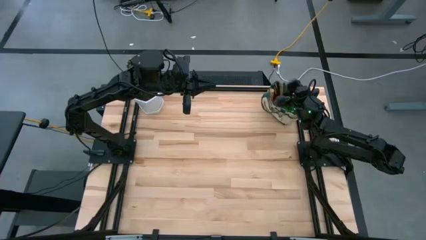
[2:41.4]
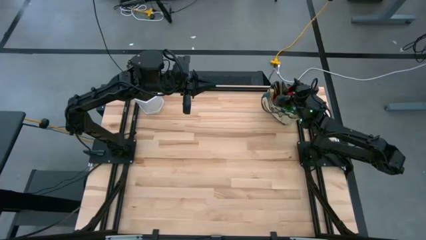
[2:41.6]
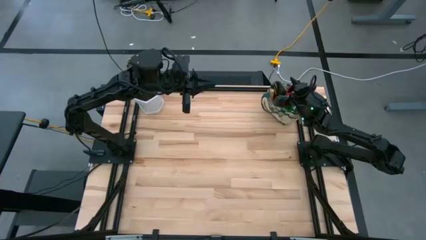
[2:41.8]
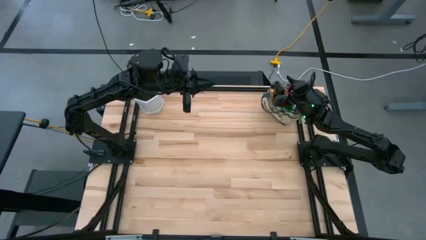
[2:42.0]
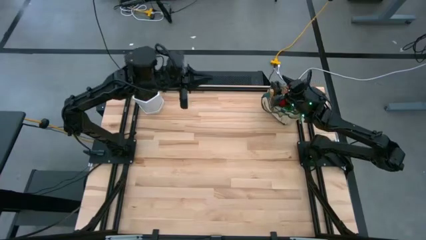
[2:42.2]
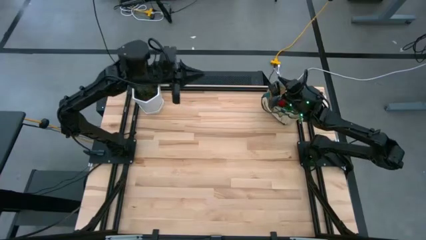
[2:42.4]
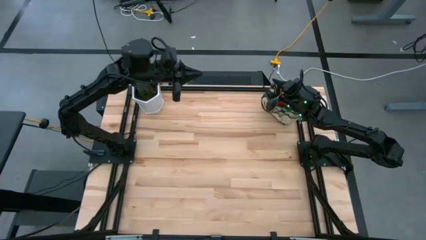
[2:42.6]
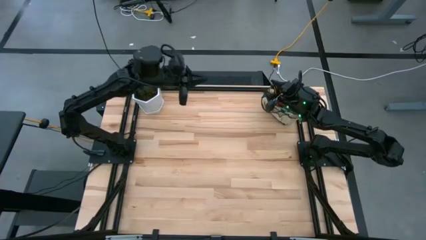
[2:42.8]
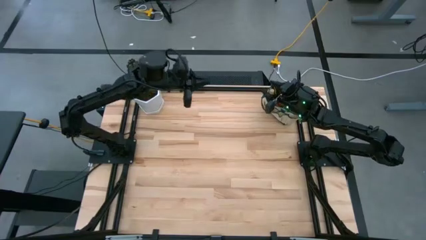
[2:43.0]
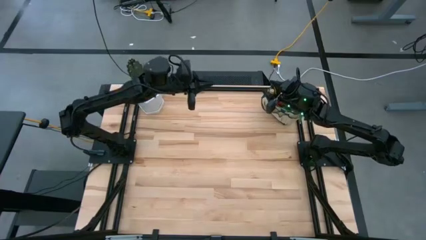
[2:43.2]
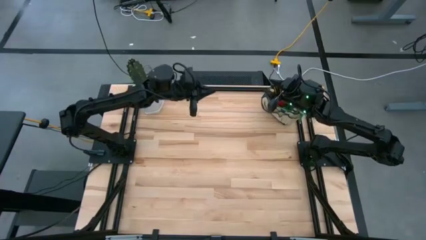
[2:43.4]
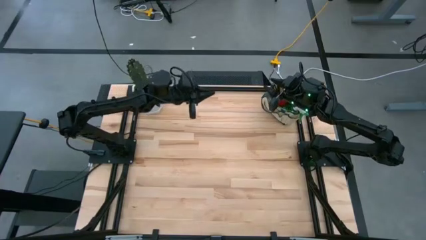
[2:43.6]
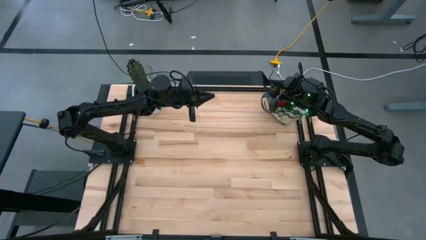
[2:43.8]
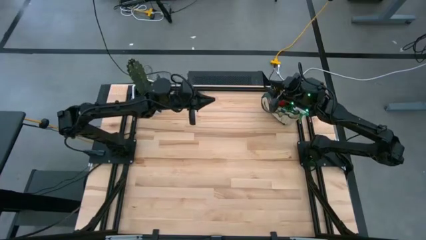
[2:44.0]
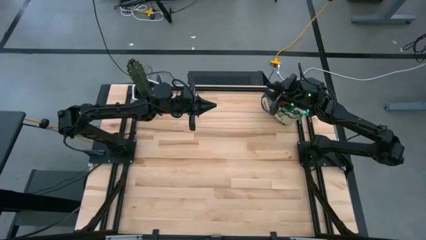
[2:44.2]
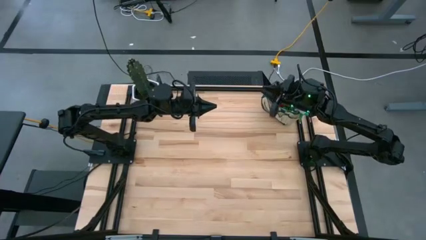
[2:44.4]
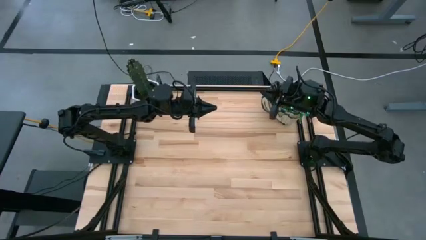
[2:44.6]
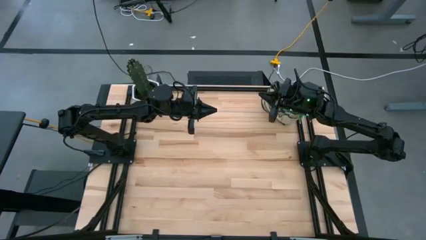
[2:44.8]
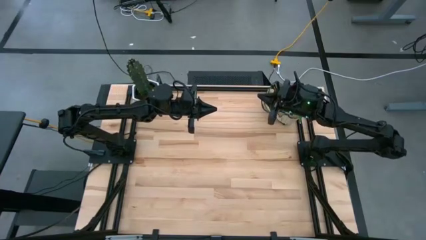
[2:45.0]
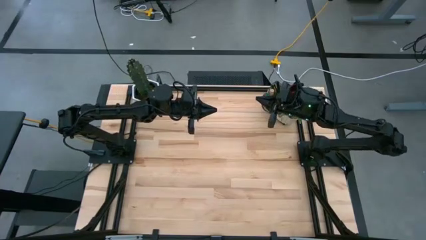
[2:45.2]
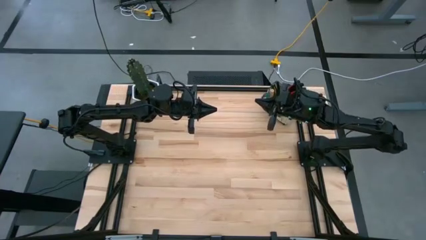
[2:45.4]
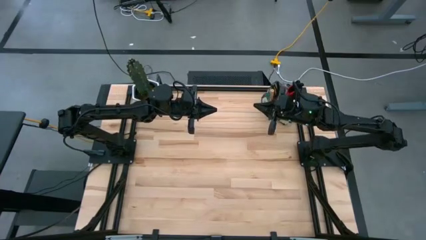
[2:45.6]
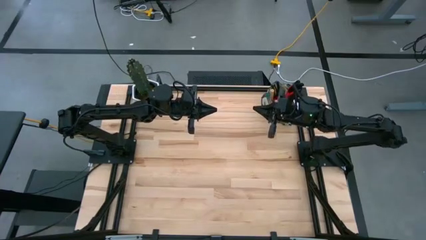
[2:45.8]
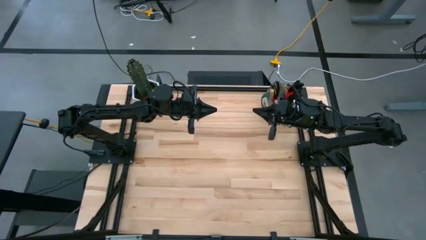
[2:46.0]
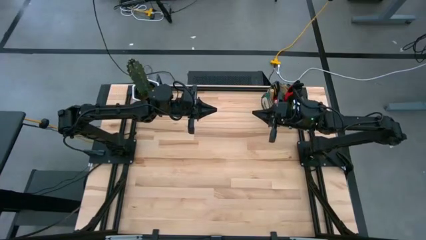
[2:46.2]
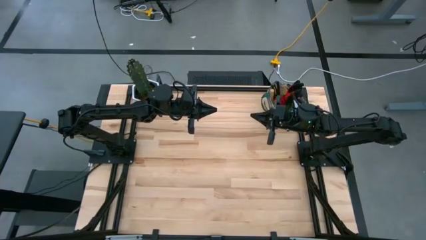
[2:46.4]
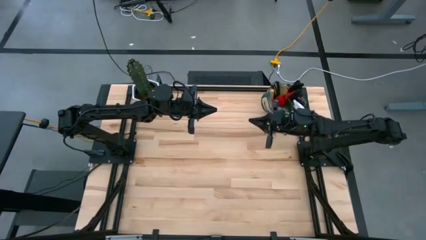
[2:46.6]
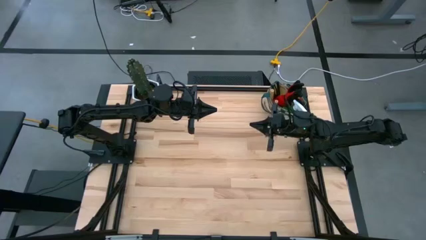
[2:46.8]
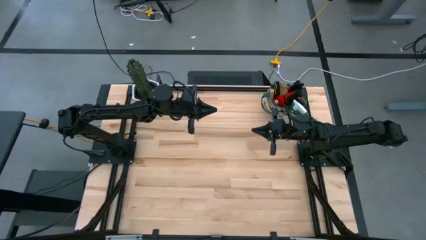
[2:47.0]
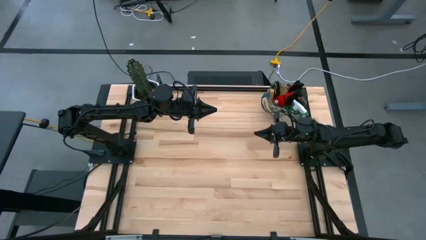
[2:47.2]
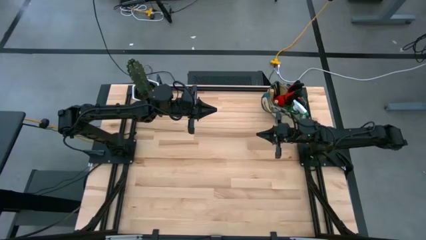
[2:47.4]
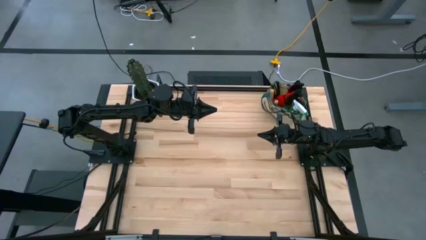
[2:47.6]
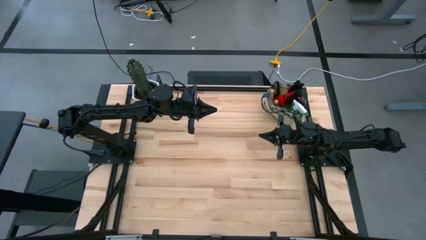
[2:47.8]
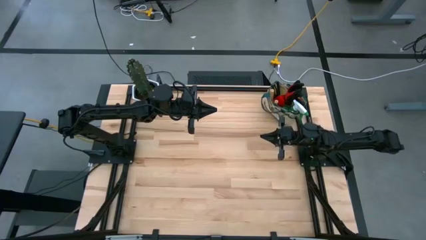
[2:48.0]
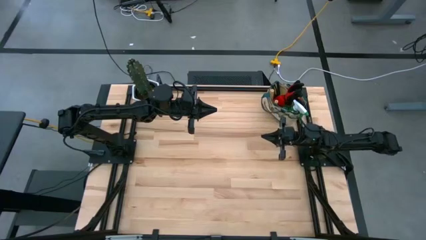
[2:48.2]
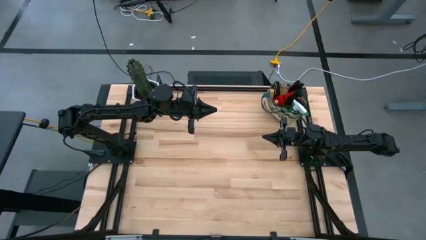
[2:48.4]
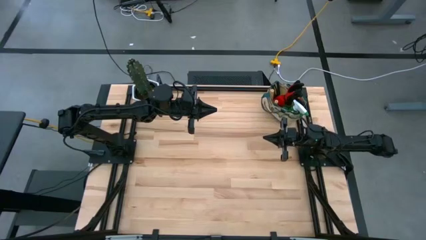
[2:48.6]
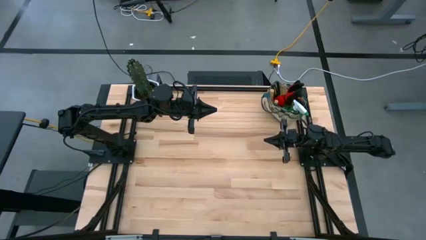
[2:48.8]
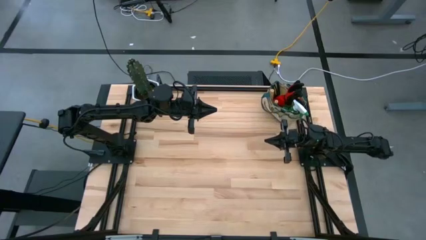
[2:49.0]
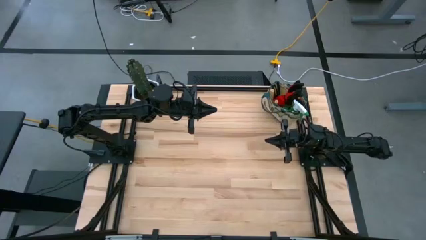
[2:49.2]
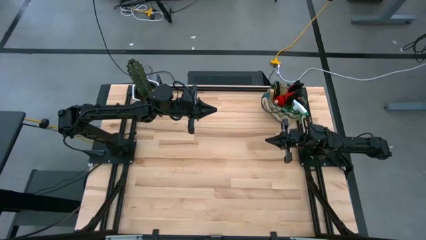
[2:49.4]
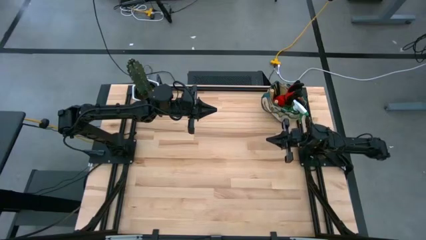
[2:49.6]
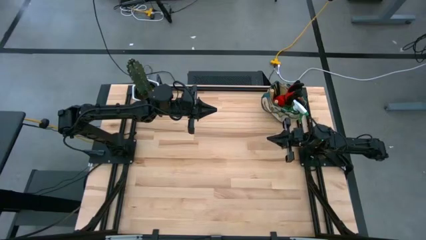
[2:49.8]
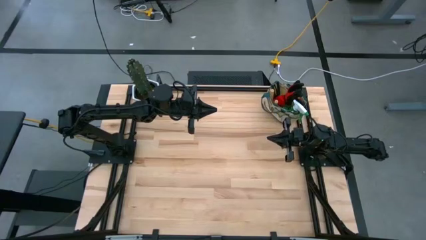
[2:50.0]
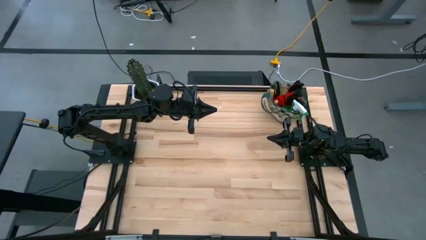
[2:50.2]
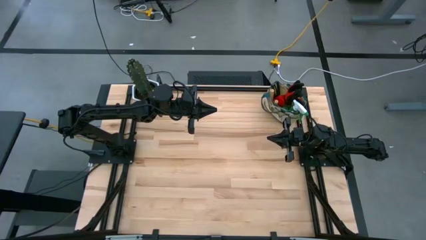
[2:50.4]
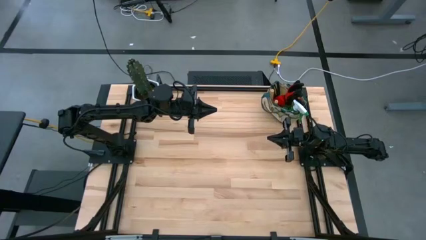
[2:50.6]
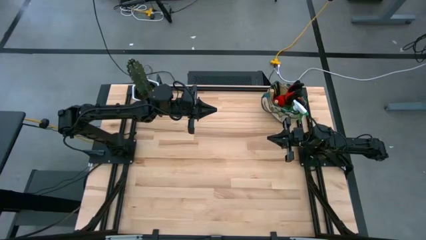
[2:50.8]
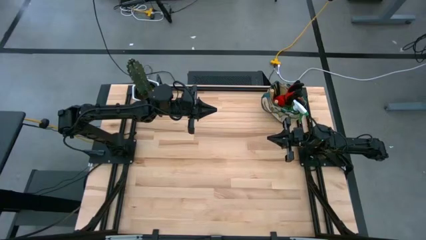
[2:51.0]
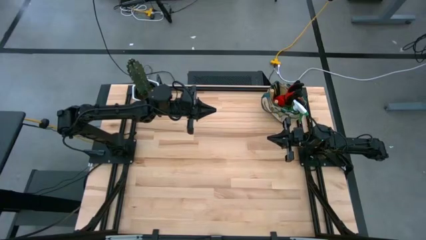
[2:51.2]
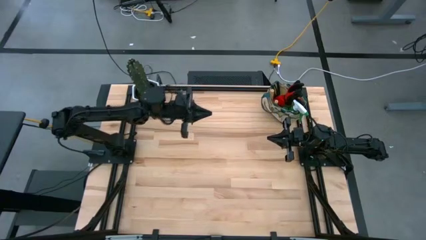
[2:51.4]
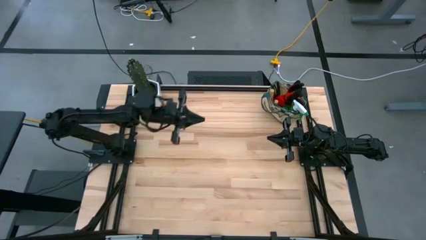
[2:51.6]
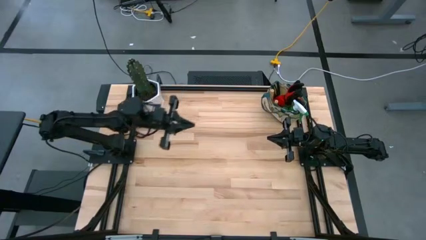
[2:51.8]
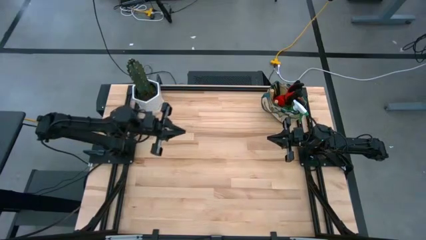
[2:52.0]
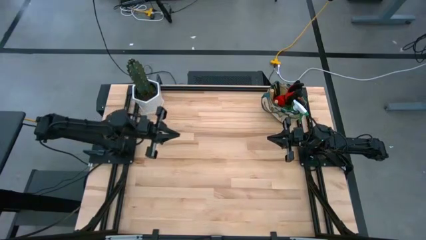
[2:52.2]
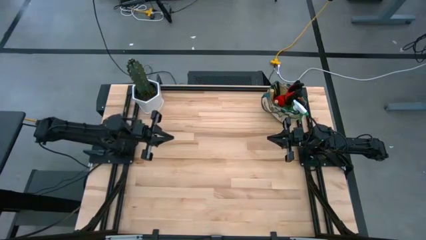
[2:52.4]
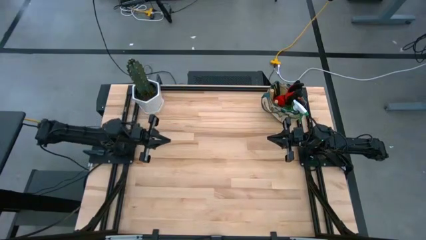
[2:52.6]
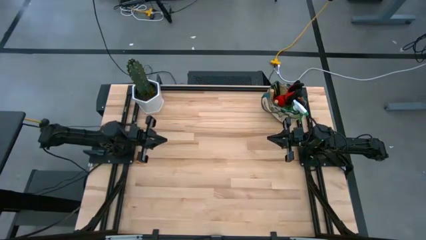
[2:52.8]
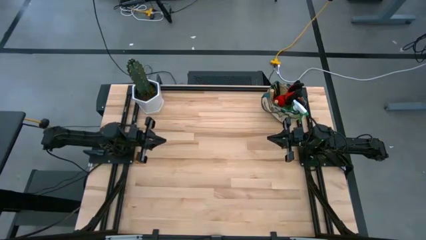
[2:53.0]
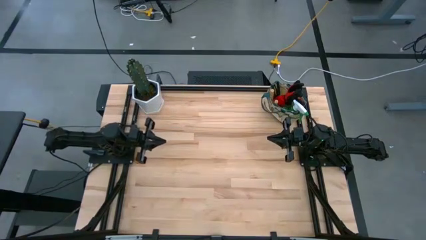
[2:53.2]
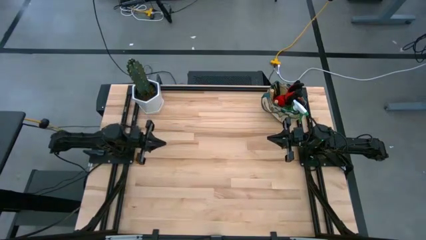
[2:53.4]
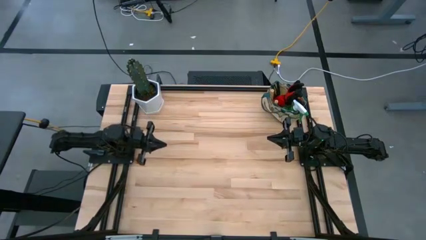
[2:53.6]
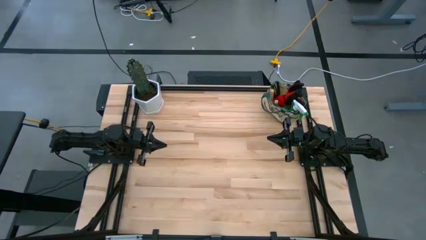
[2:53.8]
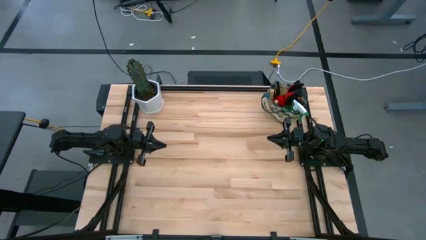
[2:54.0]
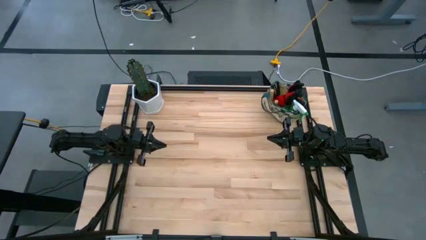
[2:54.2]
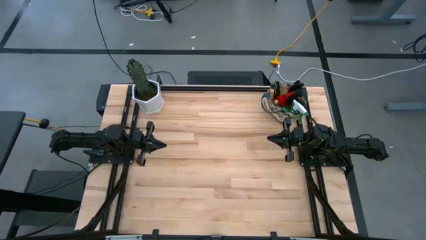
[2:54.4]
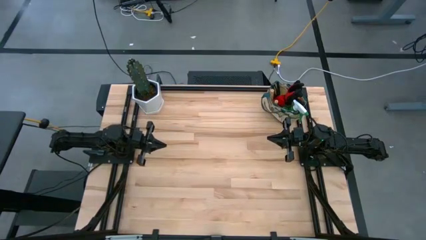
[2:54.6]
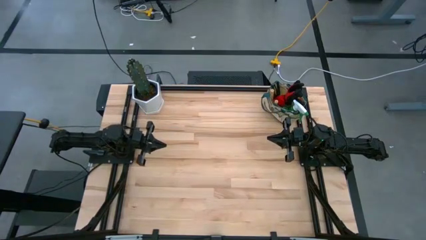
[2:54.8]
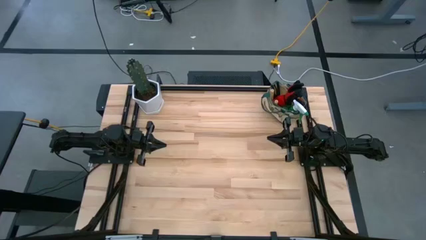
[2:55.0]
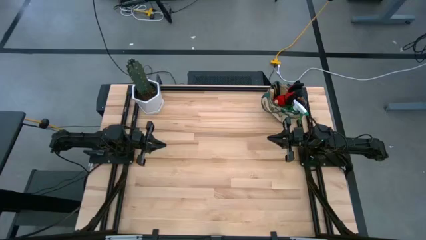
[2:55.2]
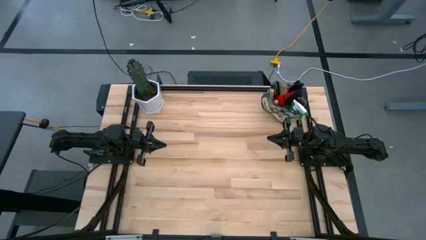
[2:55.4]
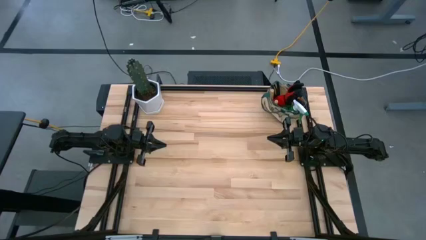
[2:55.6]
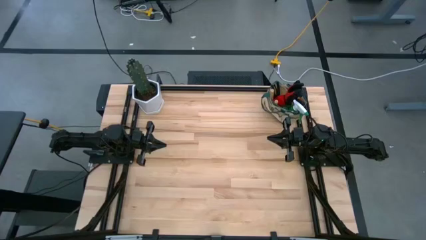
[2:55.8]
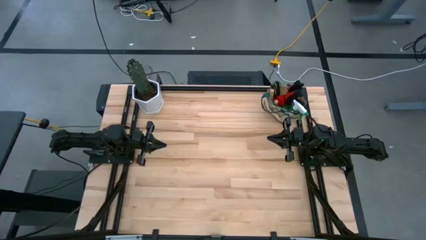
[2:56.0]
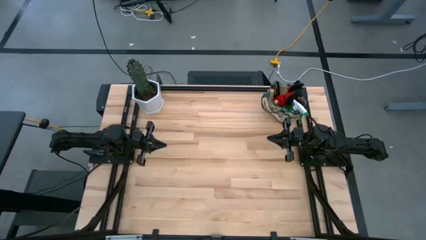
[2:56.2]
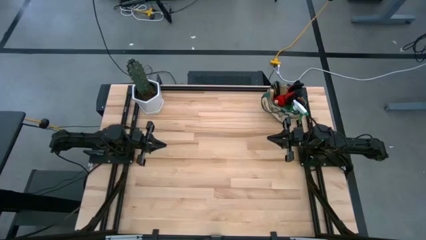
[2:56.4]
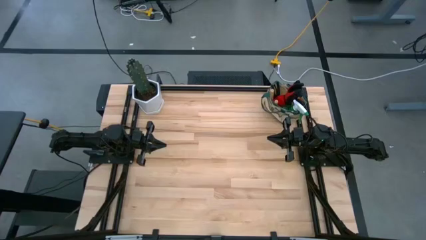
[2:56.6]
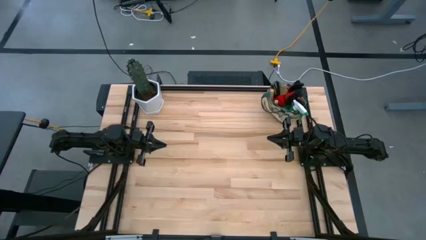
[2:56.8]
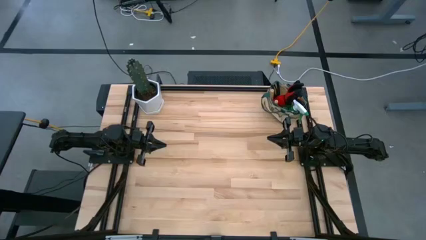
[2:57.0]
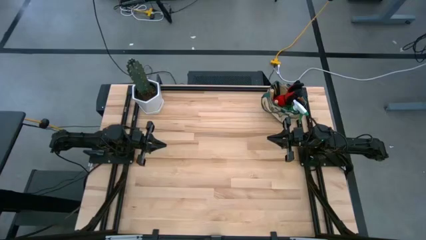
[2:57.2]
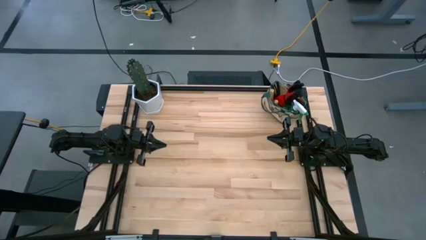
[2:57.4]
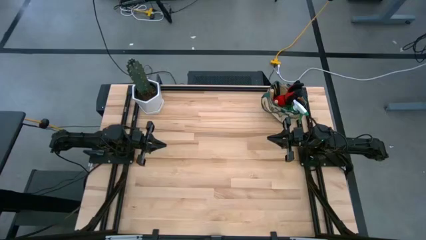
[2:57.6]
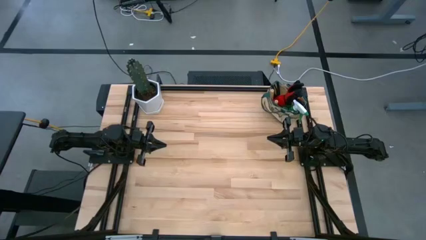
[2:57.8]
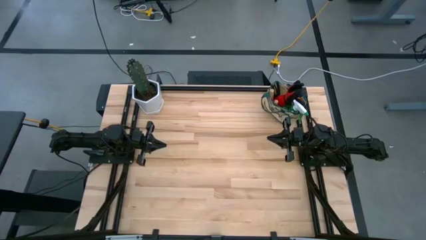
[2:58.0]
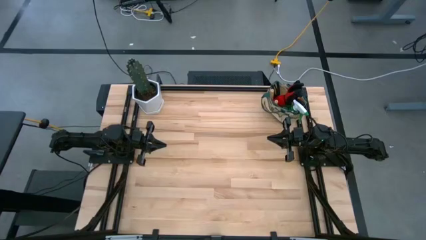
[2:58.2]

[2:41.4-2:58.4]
Task: Pick & Place Garden tools in Gardening bag
Return to Home Position

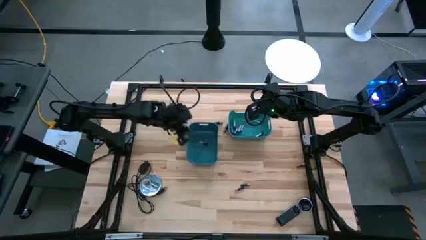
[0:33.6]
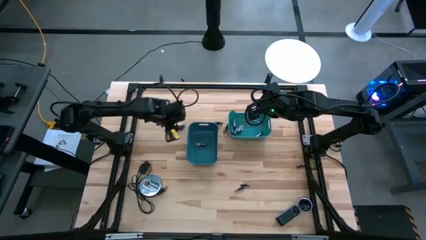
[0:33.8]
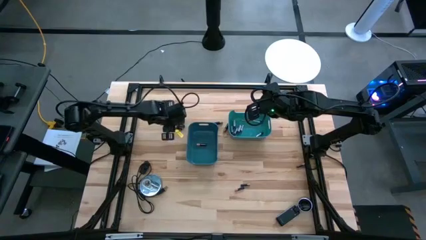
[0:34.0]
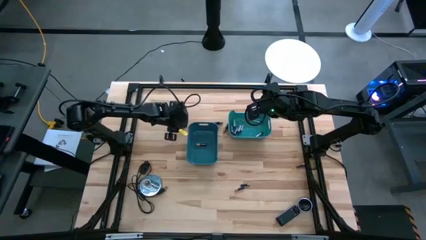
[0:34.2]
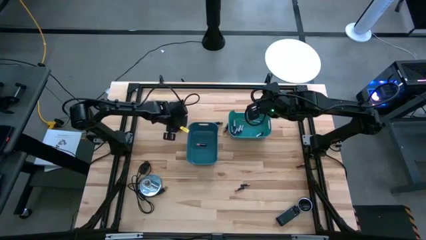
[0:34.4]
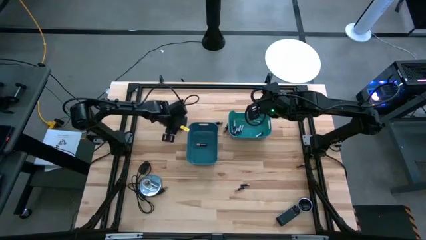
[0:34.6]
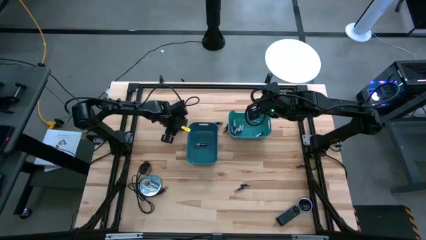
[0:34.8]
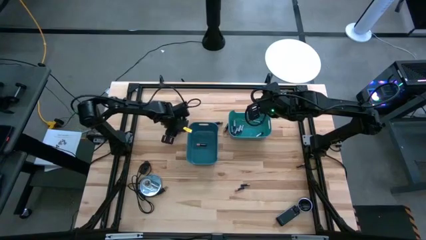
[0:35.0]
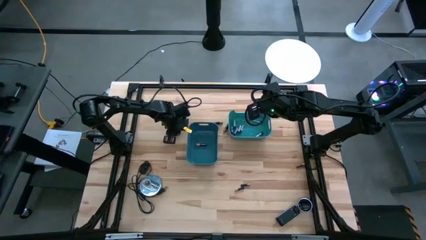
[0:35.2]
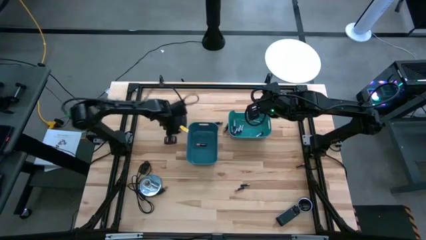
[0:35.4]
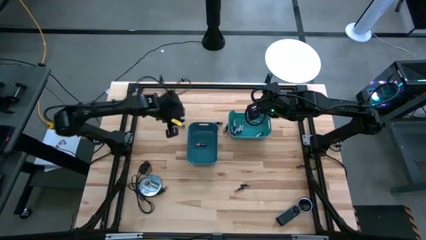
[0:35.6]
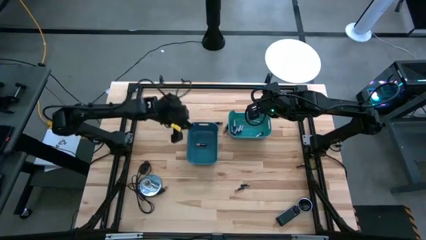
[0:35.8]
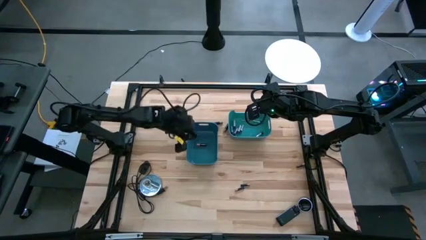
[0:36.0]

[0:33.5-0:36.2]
Task: Sort batteries
Put the black battery into the blue bin
